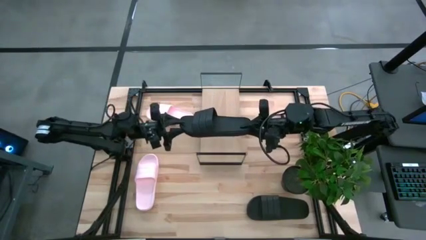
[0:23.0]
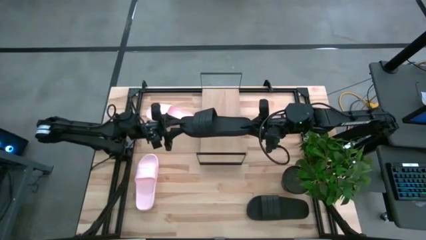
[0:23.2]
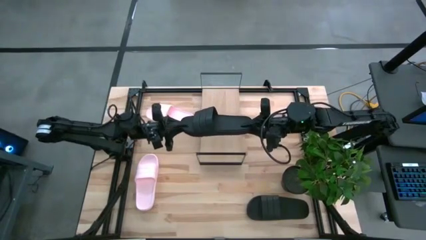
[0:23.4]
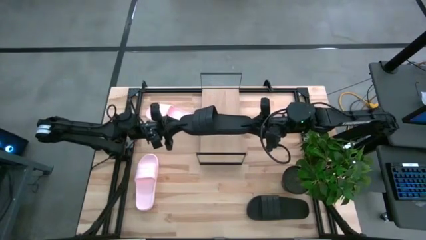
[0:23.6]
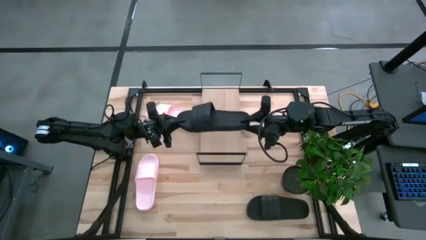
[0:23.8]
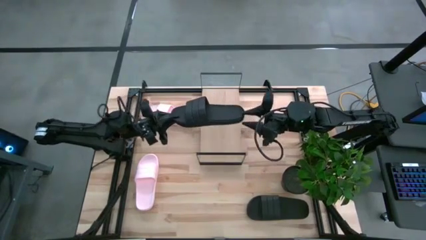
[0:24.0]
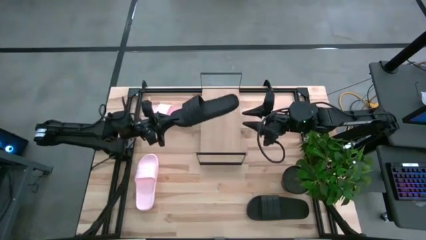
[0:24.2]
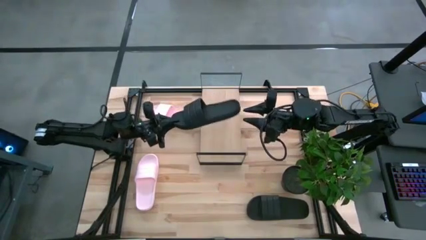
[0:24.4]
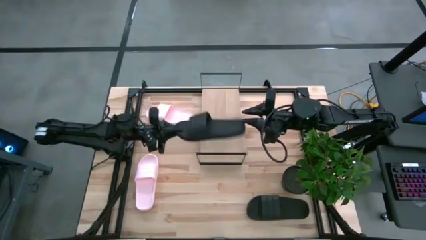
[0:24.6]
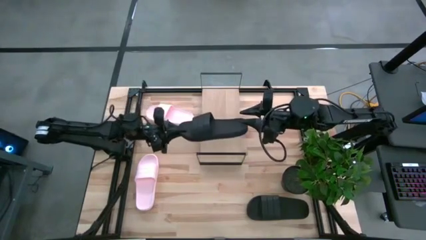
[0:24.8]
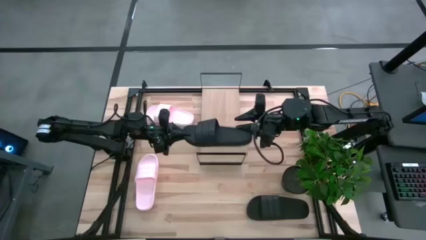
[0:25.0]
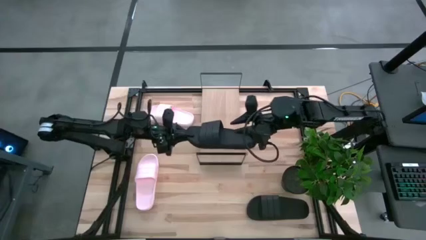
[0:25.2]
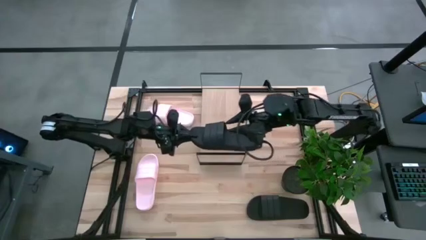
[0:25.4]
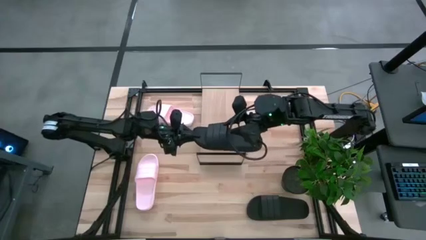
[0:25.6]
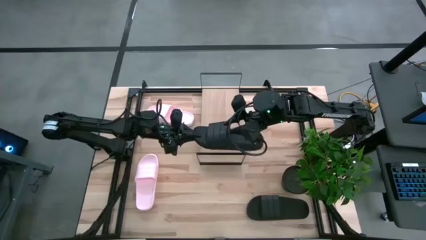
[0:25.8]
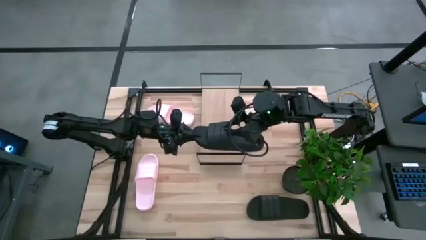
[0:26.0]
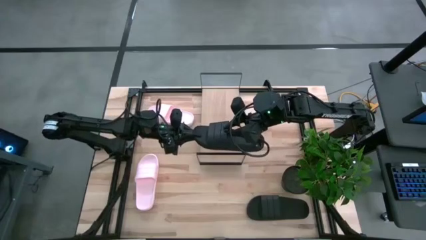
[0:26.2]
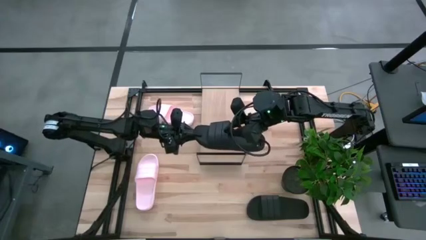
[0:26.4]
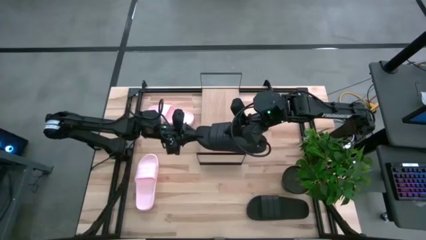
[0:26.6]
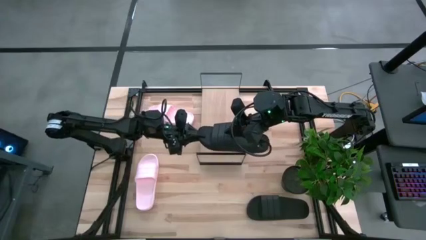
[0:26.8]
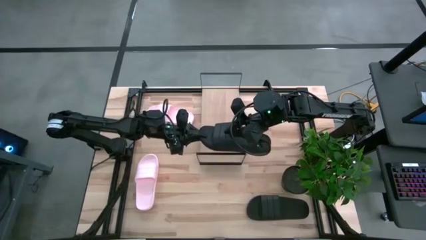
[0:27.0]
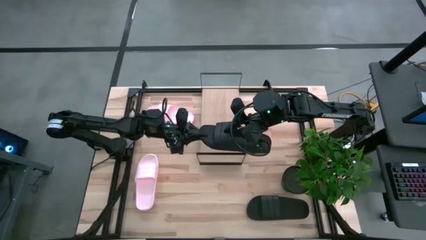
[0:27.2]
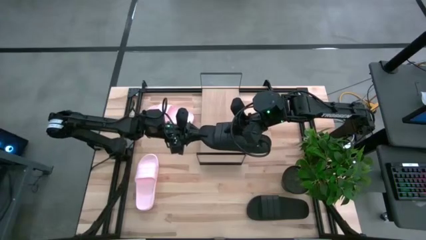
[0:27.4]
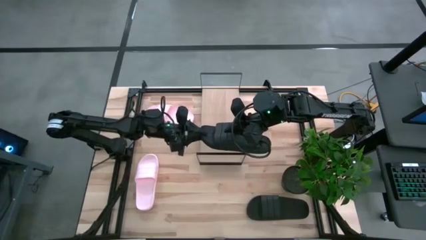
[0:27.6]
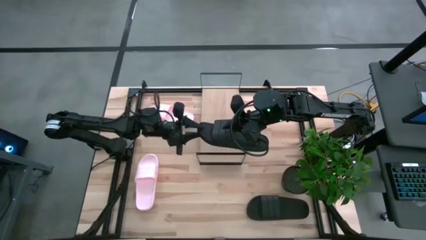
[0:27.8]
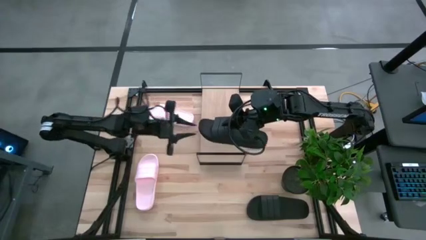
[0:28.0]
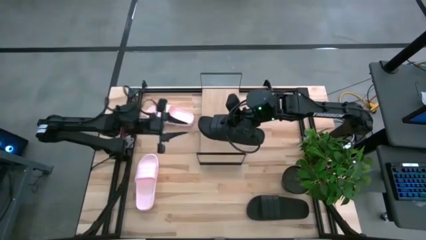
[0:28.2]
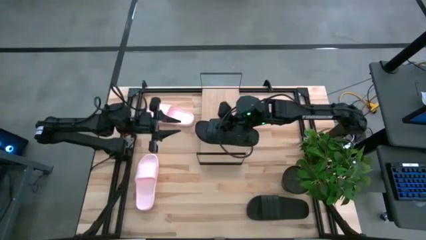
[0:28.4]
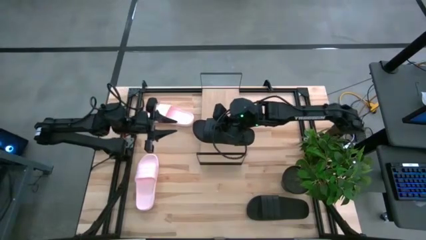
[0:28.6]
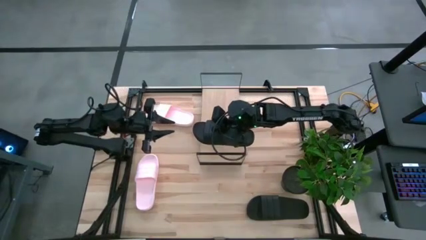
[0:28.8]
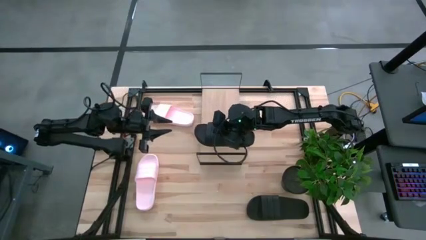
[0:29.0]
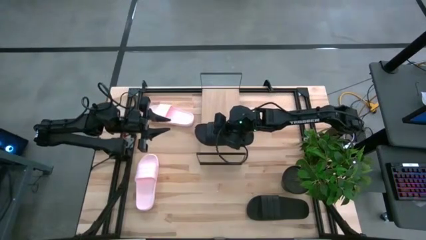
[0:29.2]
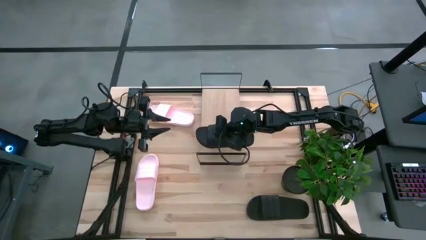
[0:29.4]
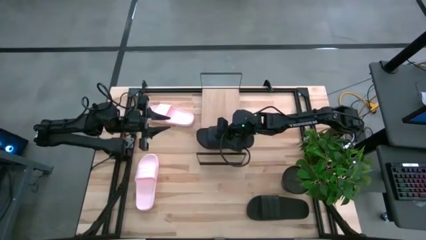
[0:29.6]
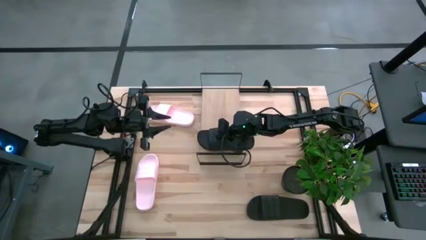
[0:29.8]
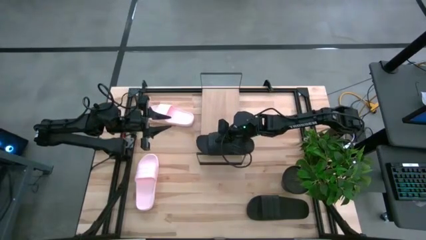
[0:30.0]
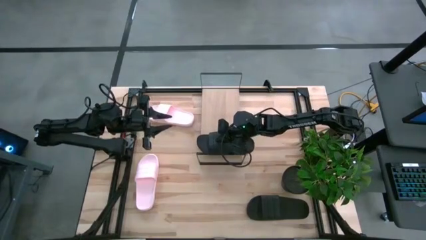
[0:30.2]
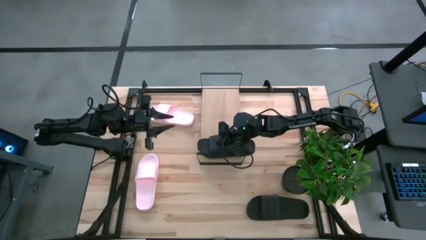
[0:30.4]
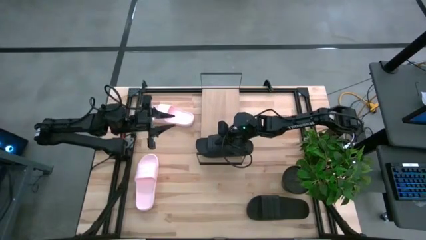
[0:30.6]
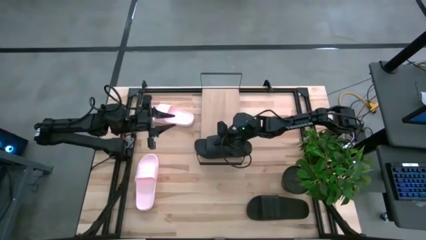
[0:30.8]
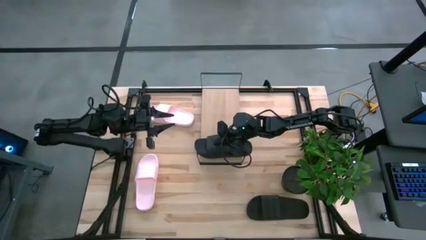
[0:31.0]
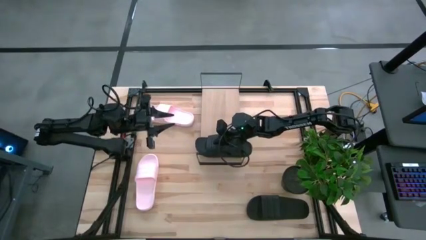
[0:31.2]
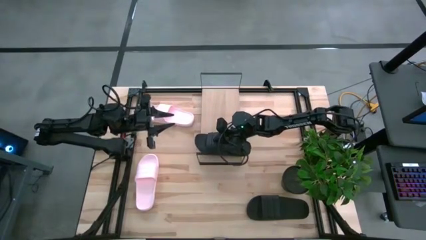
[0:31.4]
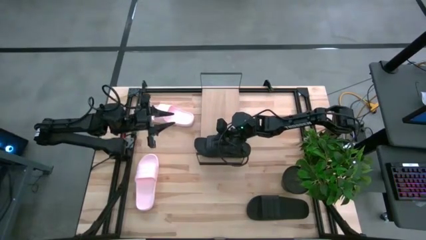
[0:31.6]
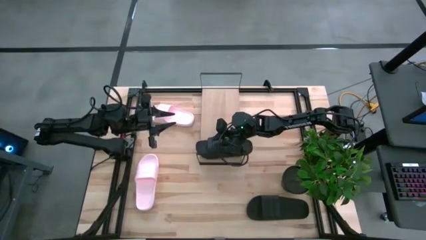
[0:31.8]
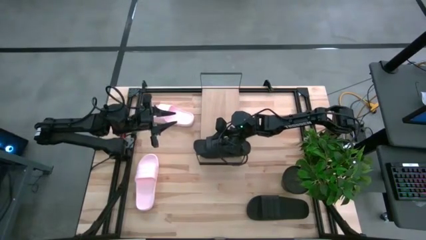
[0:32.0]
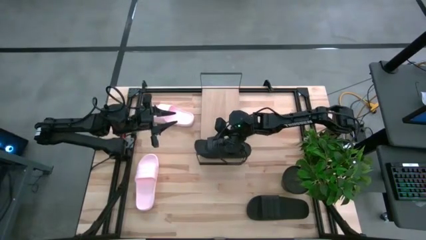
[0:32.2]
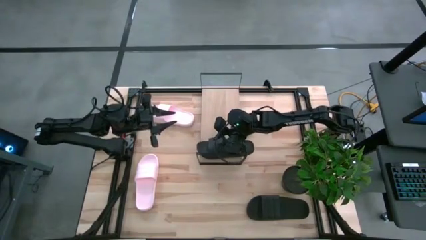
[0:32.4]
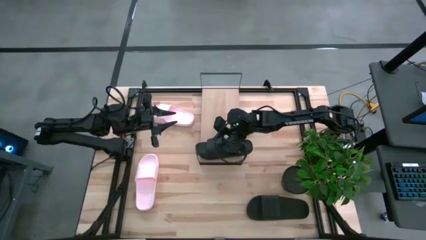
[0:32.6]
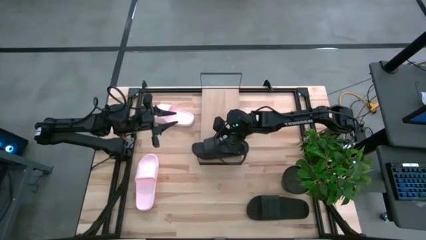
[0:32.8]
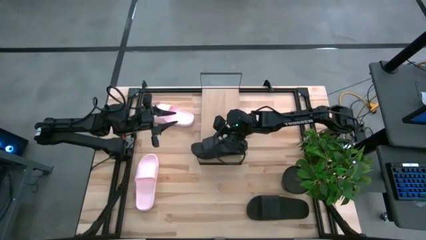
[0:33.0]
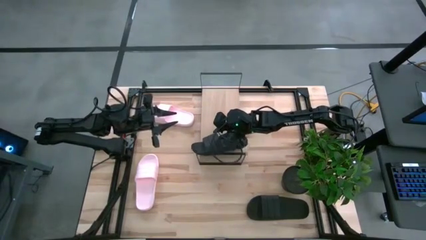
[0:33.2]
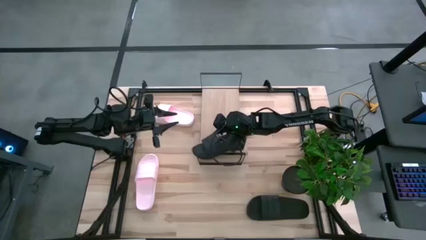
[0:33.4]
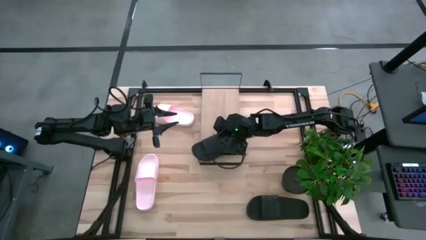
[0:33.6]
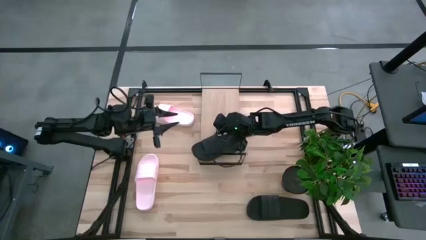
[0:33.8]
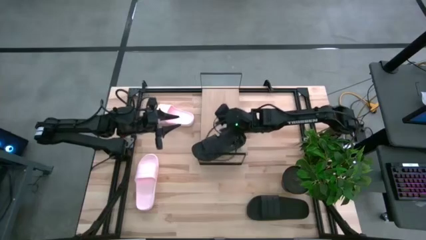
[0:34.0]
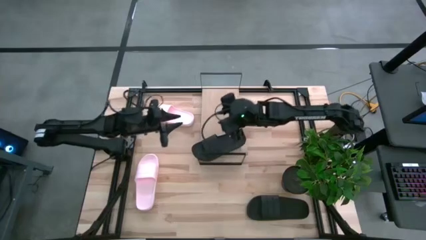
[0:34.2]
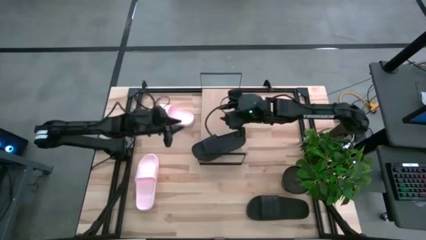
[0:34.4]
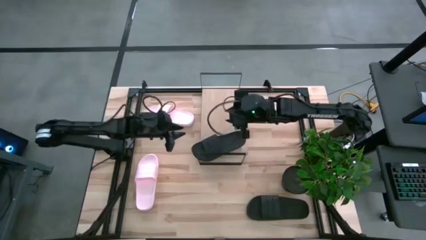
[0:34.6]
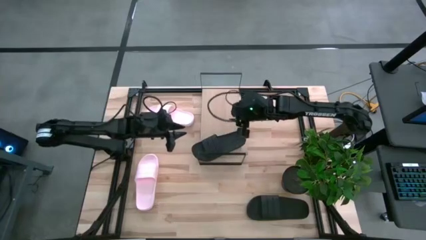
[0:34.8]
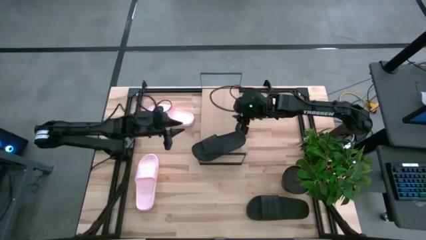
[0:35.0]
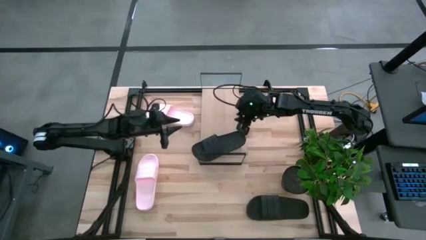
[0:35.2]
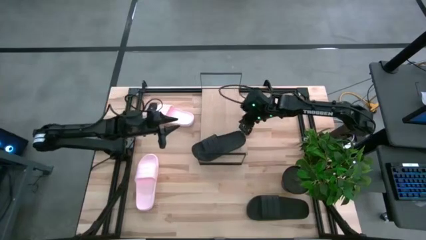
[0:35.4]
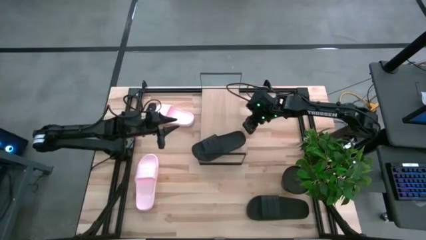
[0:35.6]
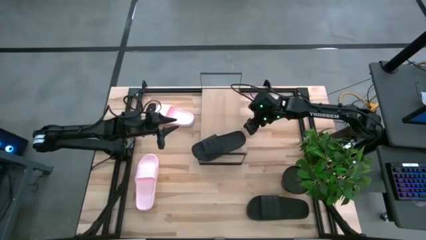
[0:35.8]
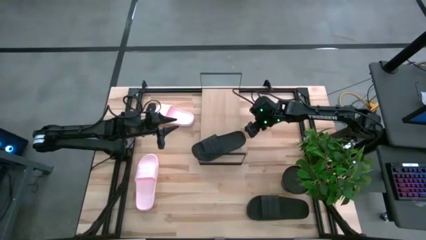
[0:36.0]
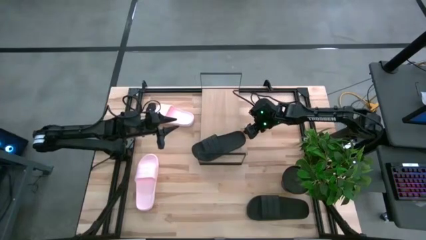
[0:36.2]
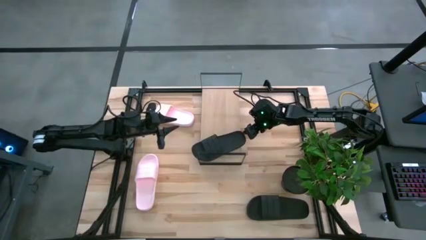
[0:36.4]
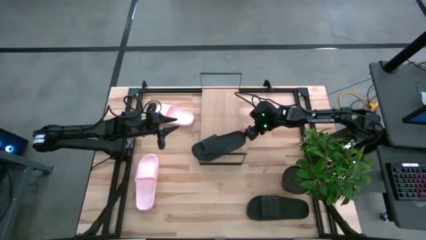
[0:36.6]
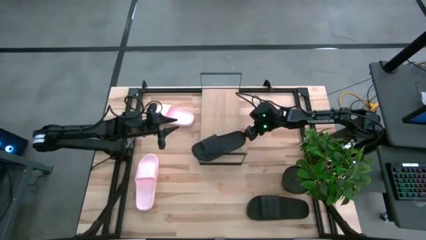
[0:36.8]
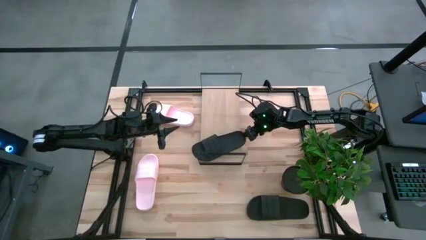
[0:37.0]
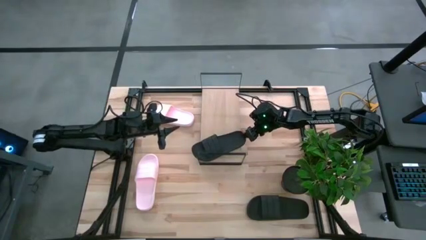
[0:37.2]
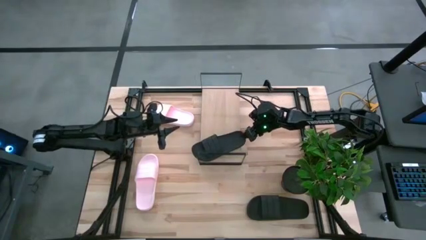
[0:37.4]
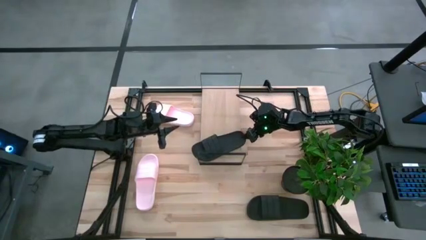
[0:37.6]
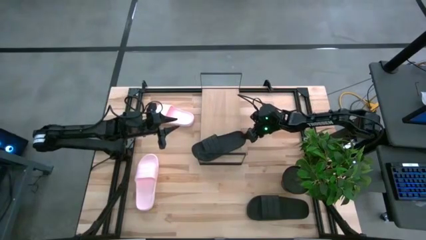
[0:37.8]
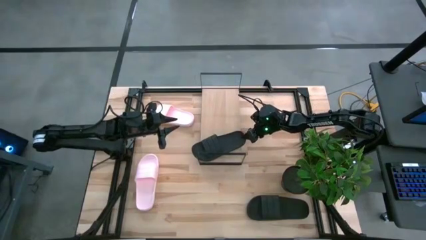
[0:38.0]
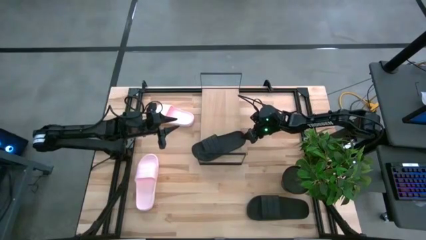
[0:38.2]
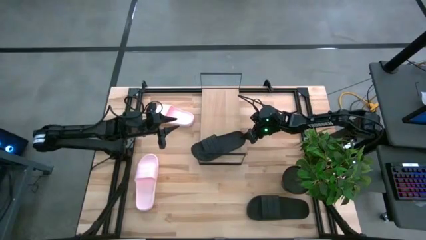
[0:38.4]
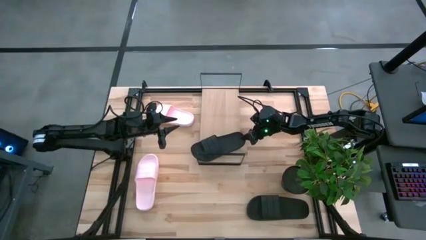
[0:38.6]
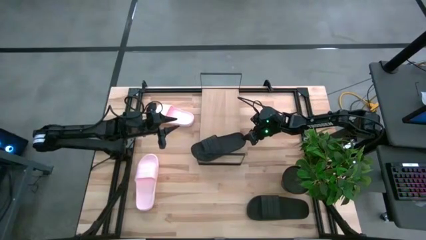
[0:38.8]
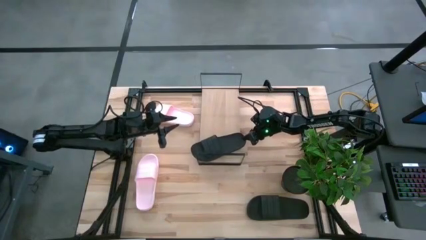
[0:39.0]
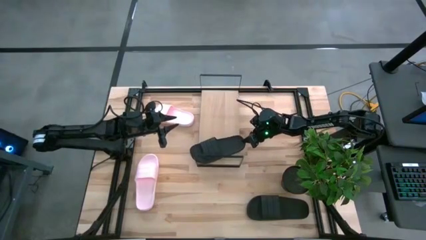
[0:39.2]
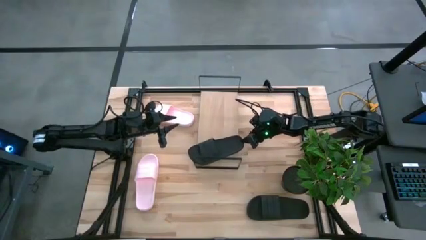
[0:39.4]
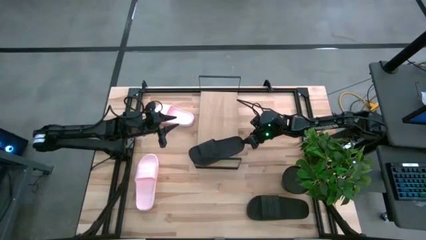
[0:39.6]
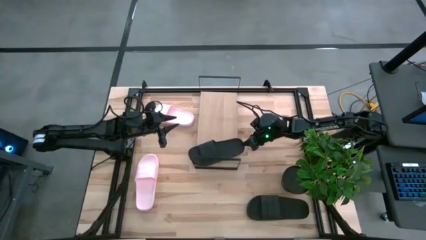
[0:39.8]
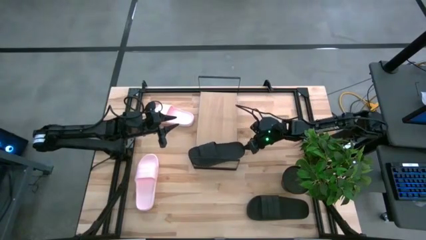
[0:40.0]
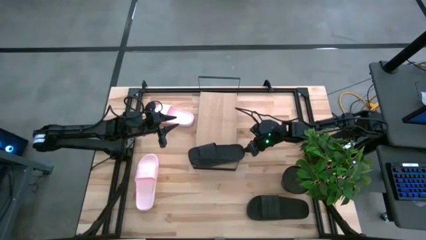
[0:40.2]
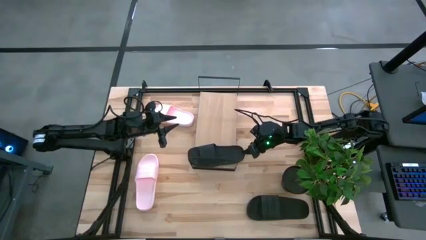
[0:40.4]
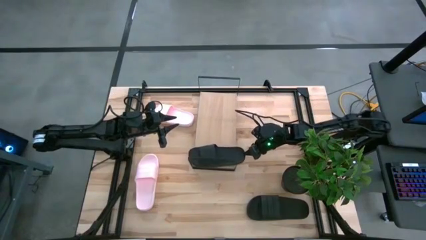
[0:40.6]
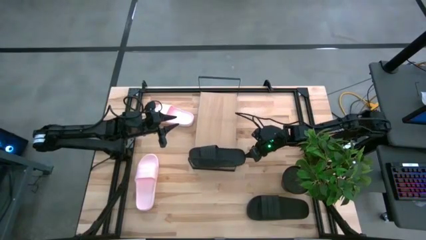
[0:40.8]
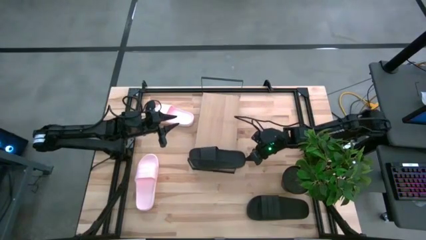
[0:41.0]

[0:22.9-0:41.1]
Task: Pick and place slides into the shelf
Put the top black slides on the shelf
